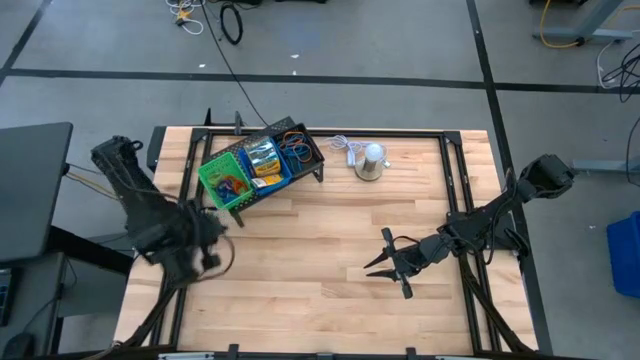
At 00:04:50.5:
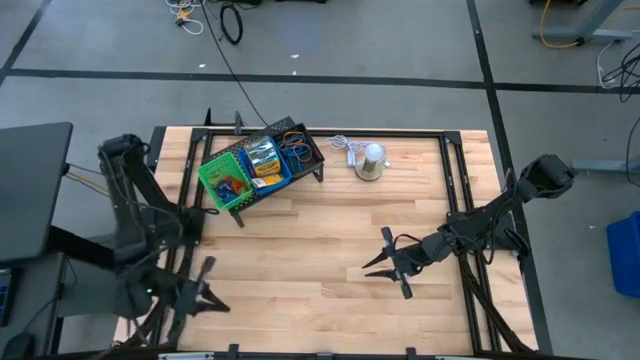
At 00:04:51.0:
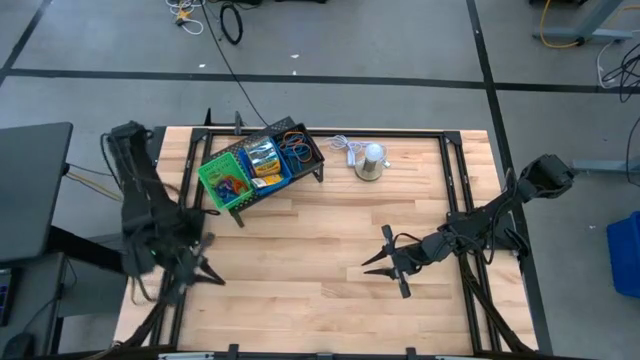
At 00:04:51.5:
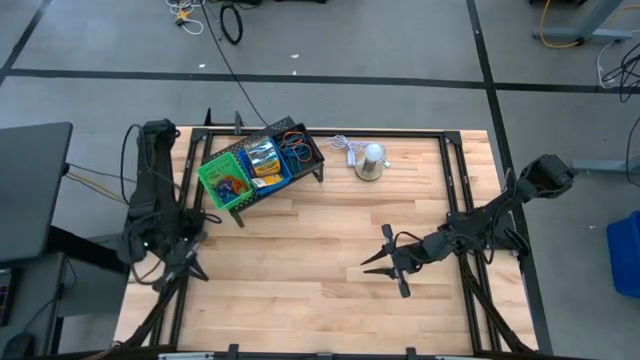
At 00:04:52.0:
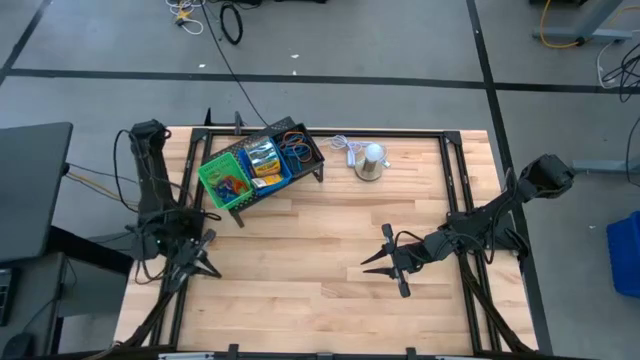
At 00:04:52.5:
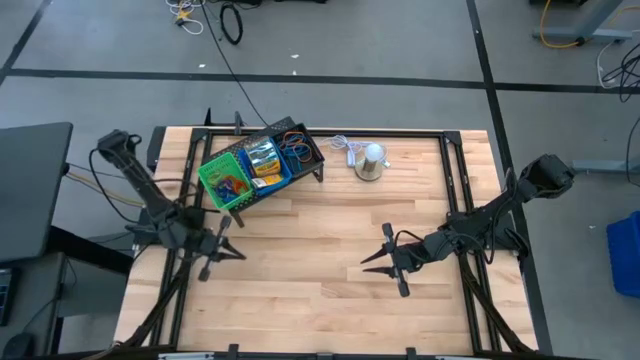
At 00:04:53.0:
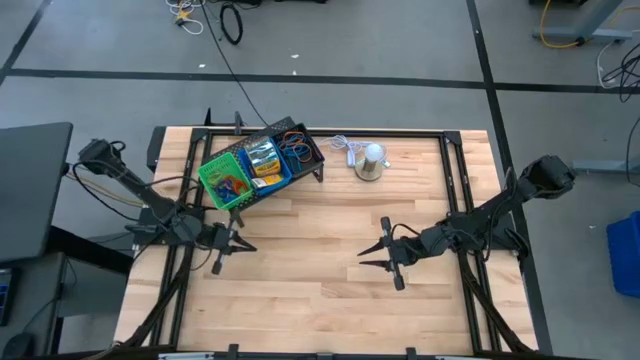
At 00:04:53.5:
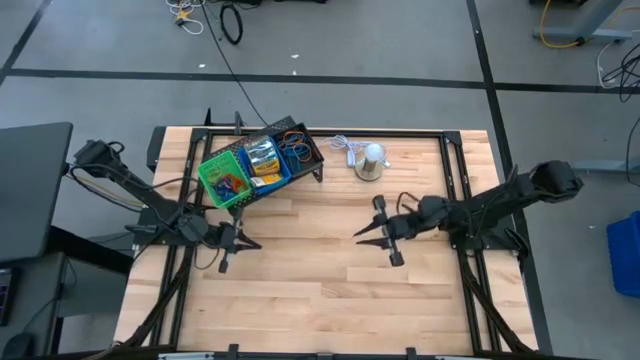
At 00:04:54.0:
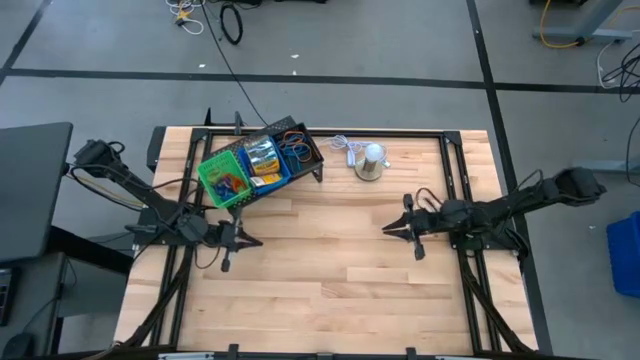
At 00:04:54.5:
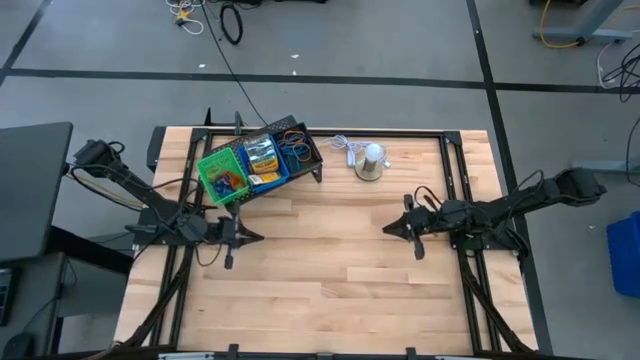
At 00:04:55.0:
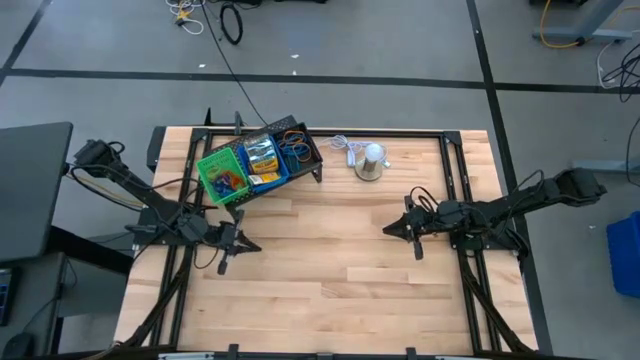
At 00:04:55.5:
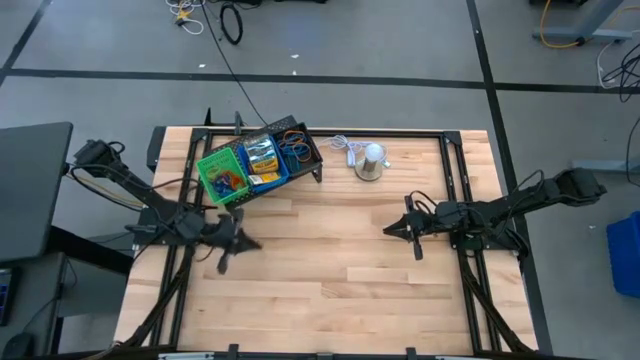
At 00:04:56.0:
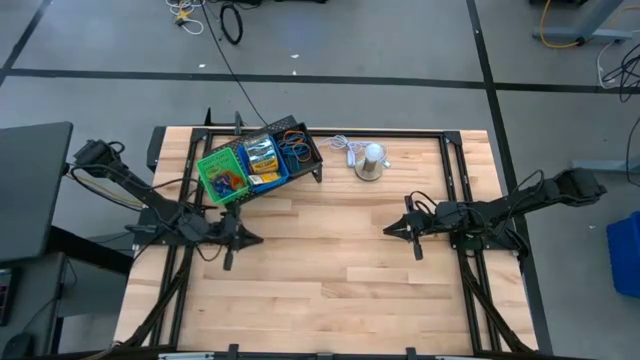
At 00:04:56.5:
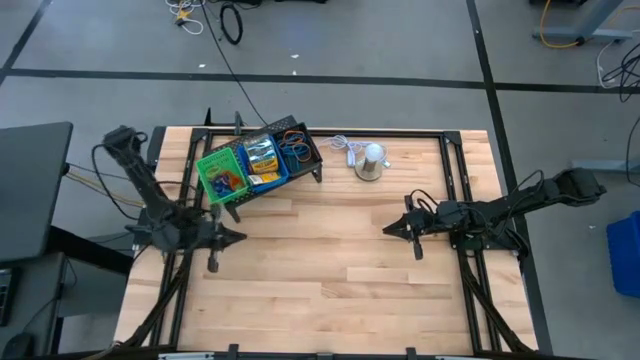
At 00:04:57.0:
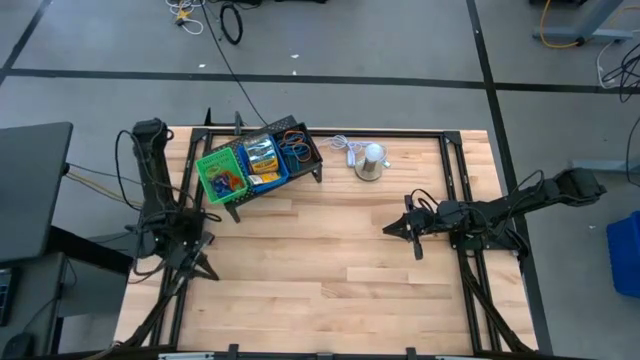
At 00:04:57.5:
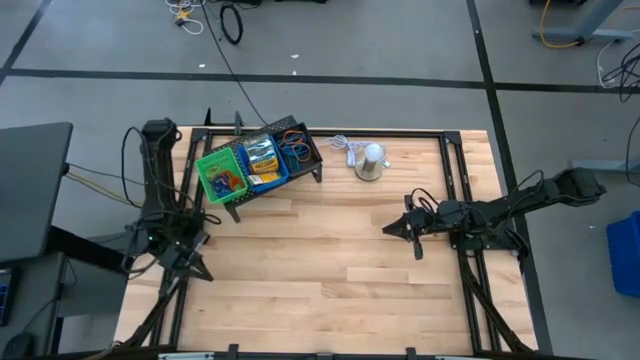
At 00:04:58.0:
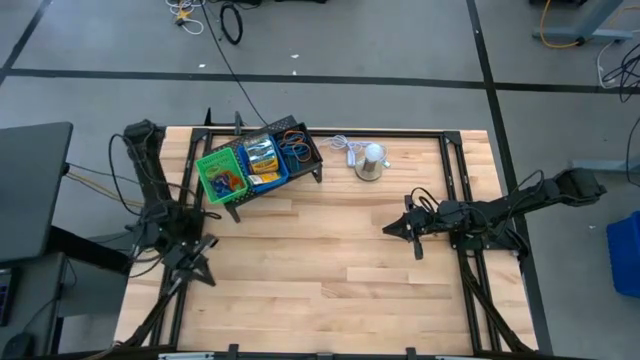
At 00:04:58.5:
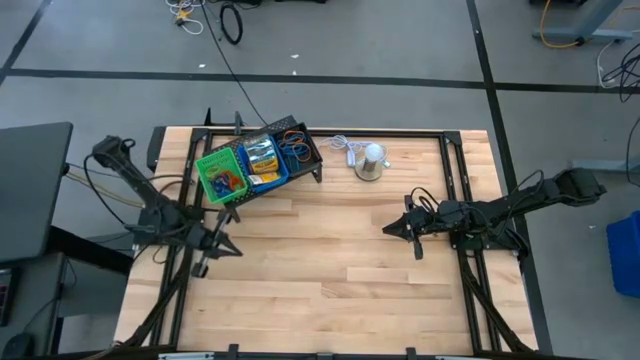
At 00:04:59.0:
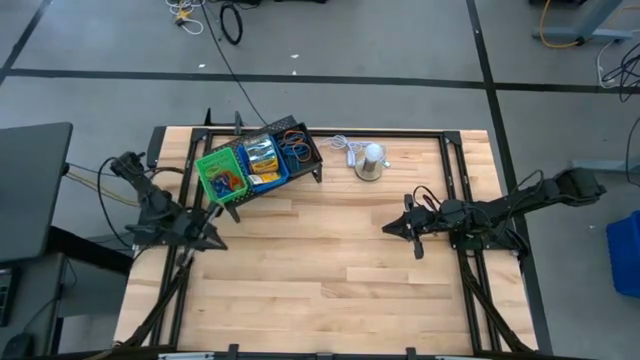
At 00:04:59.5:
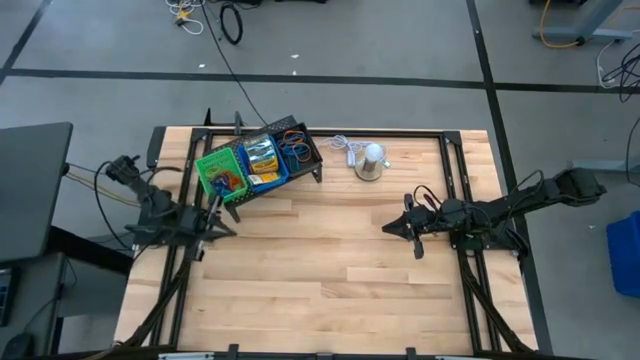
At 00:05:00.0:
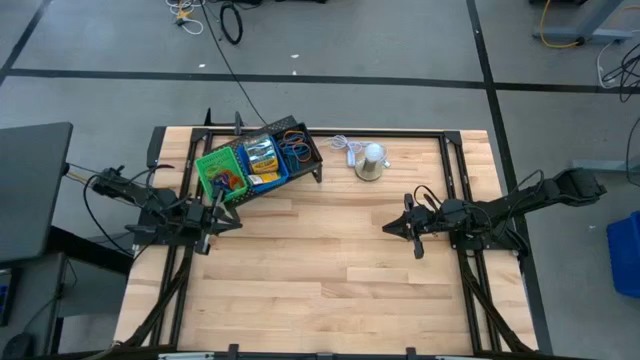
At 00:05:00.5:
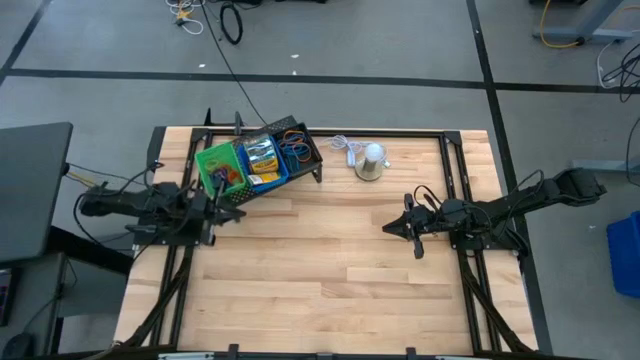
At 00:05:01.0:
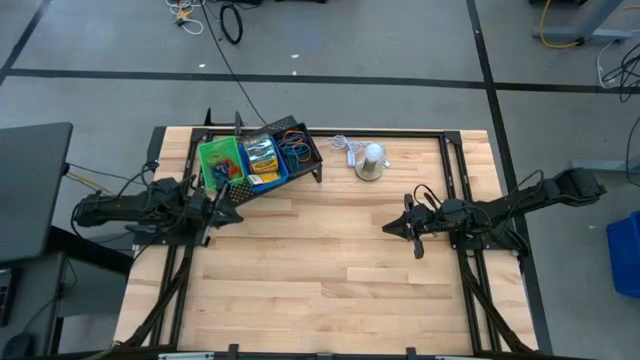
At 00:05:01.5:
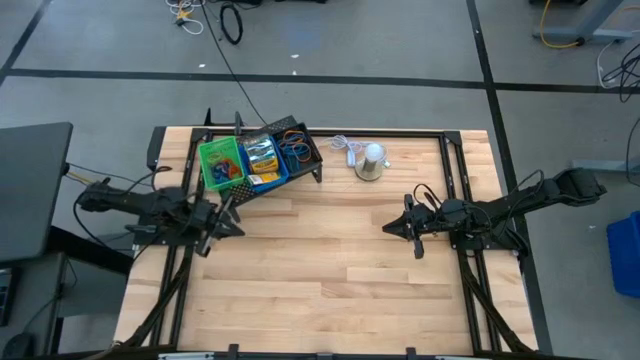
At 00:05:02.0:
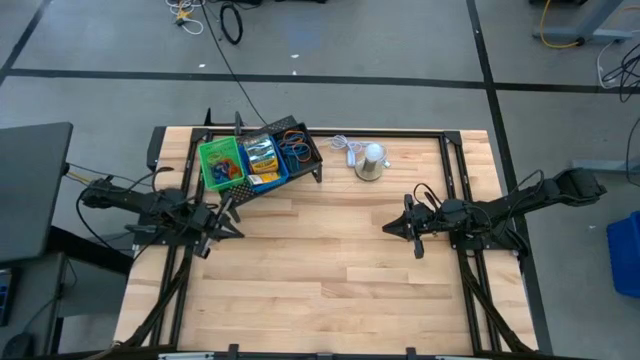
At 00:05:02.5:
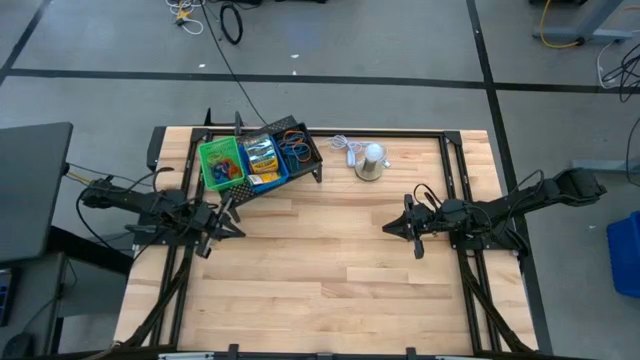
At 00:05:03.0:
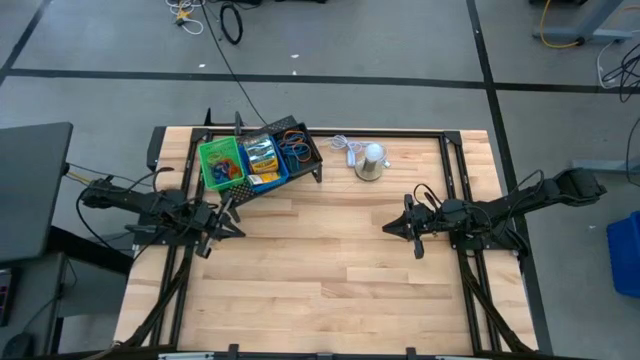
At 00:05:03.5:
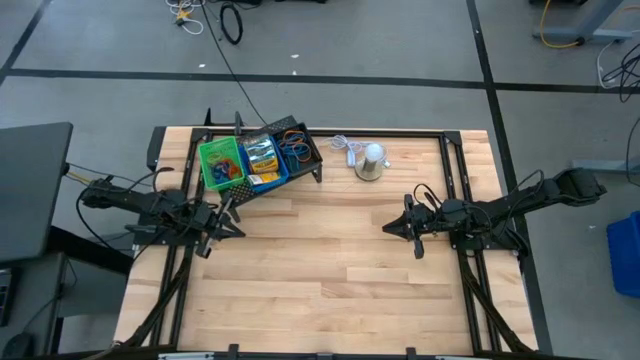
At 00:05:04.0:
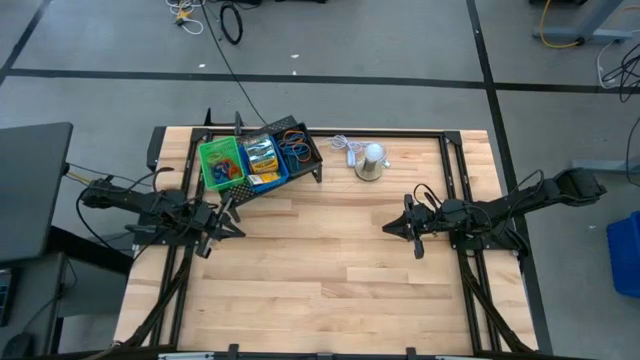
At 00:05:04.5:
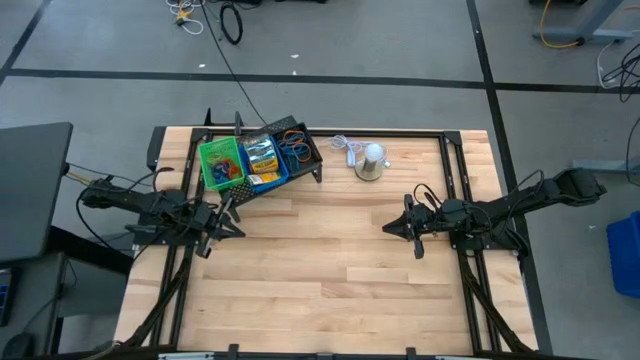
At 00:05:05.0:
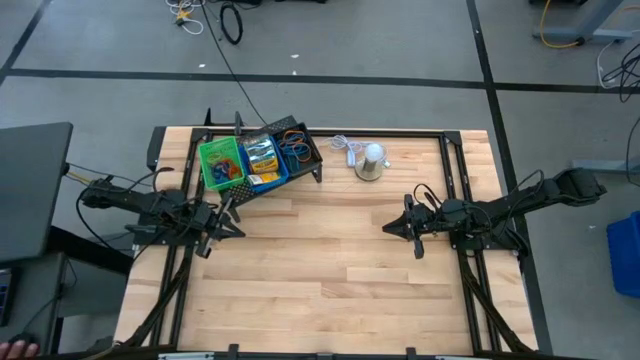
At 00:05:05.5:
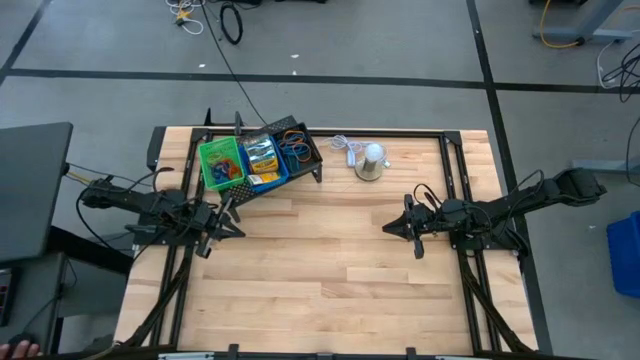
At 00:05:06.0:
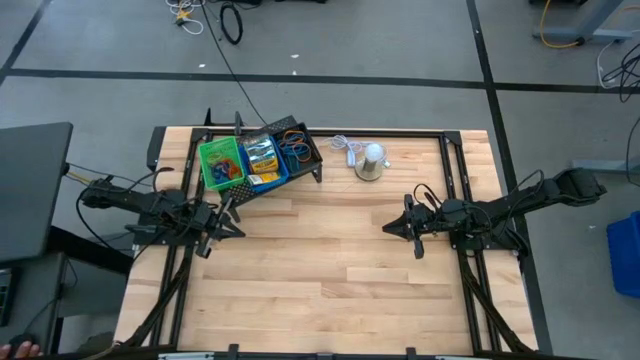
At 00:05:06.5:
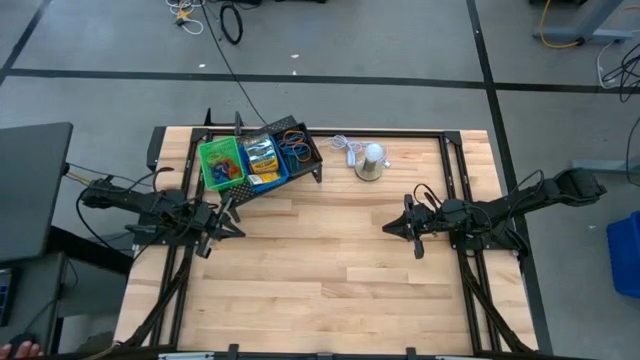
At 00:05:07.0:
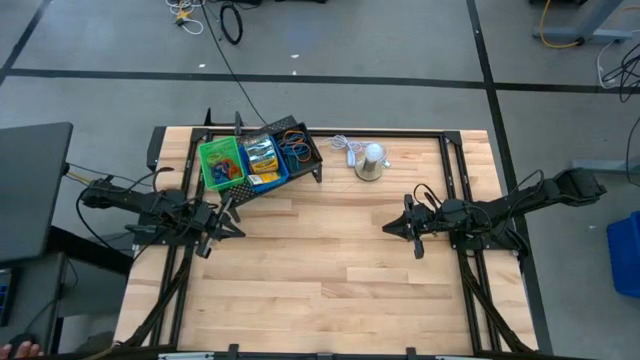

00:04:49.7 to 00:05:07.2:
Task: Pick & Place Office Desk Supplies
Return to Home Position
